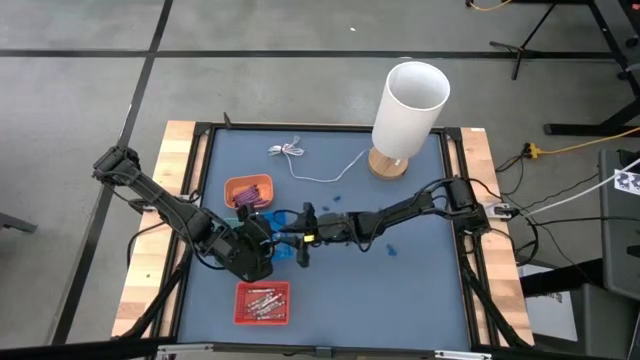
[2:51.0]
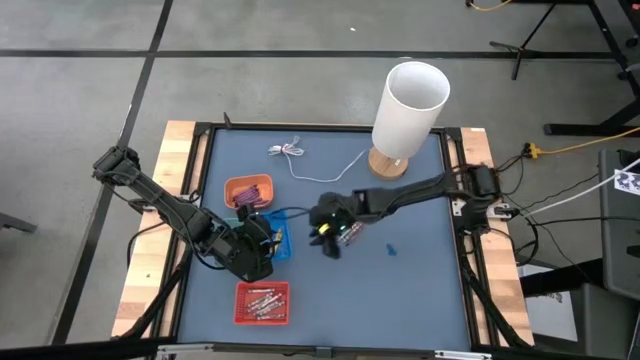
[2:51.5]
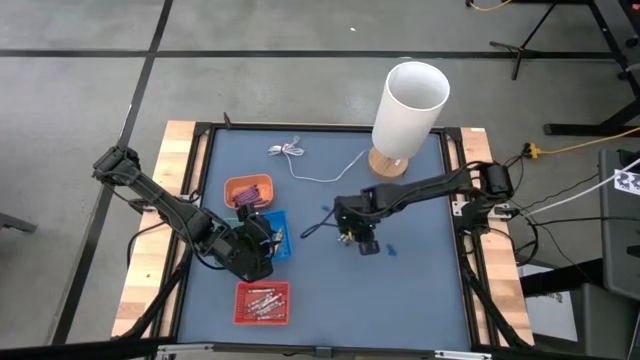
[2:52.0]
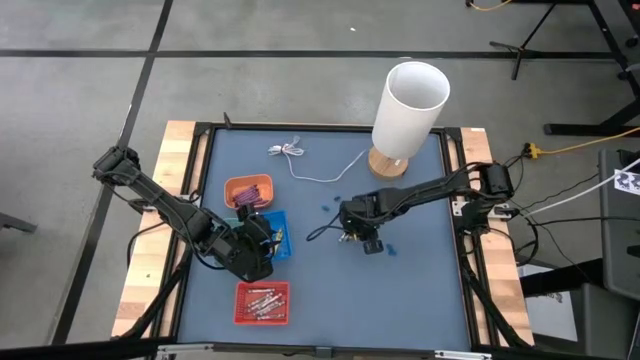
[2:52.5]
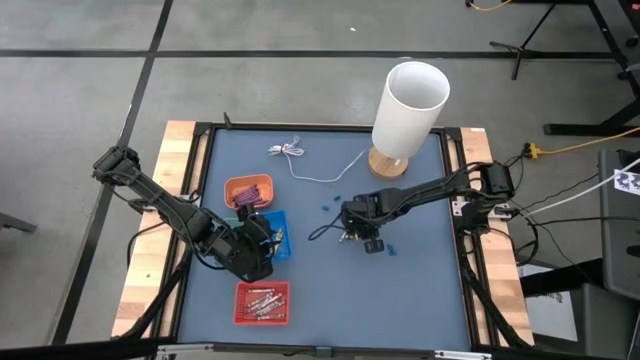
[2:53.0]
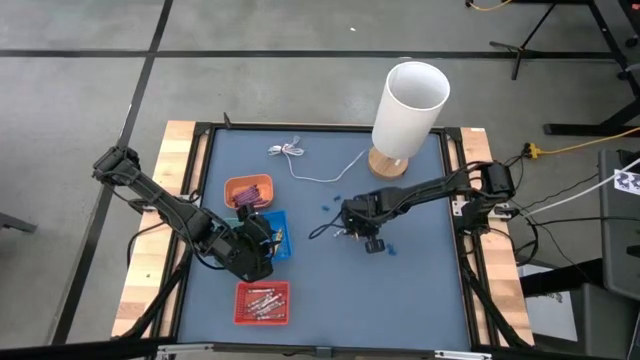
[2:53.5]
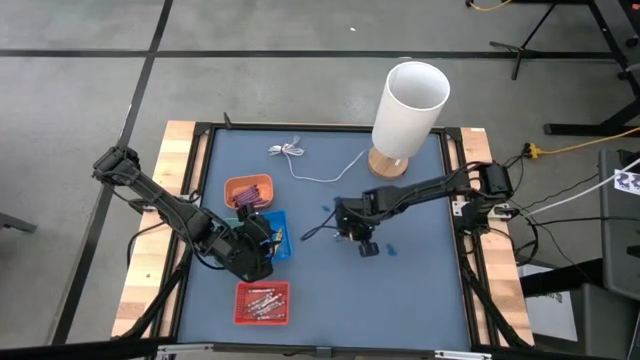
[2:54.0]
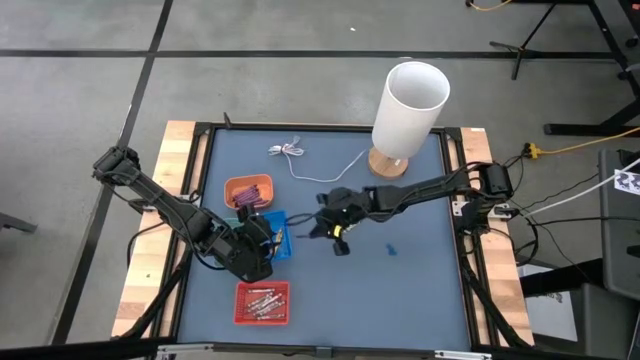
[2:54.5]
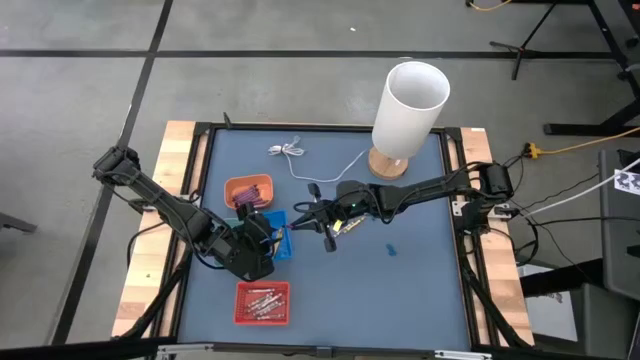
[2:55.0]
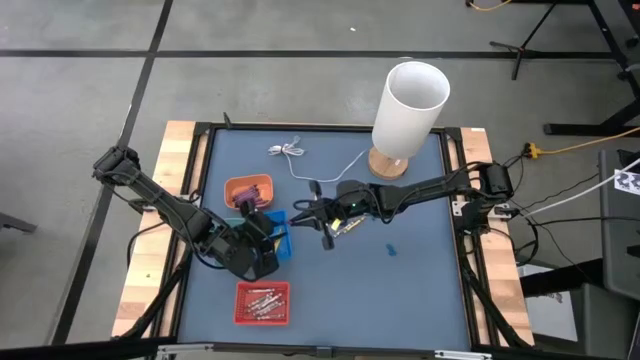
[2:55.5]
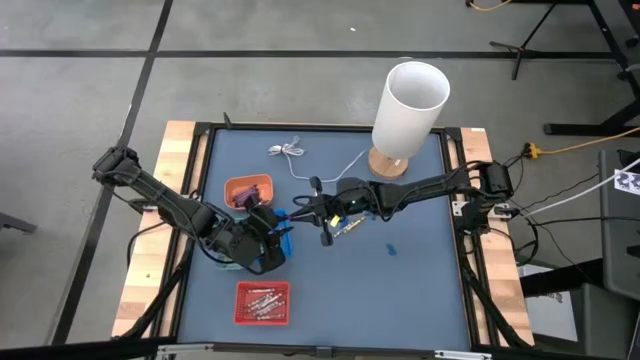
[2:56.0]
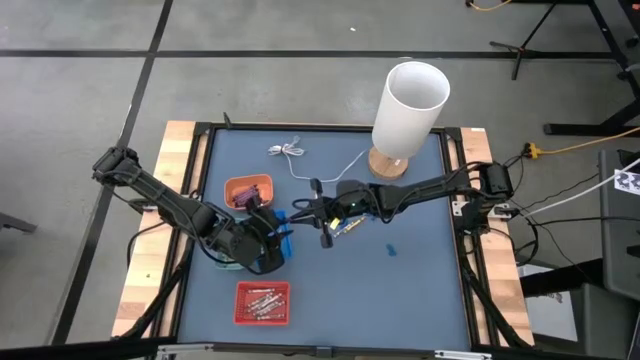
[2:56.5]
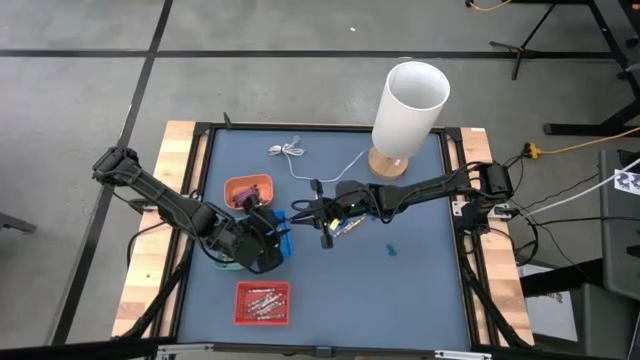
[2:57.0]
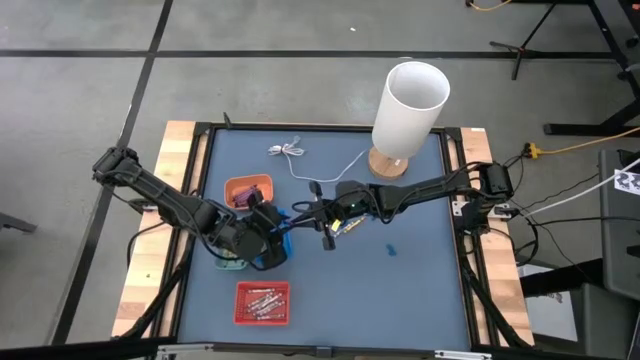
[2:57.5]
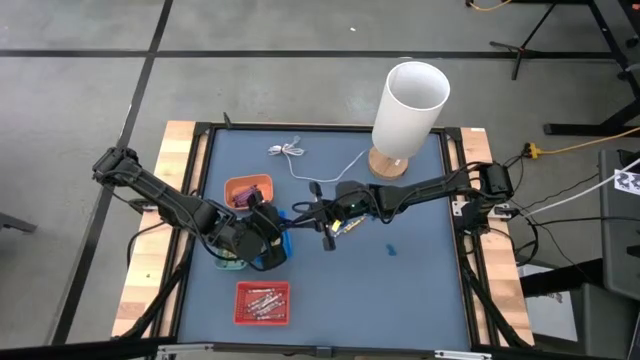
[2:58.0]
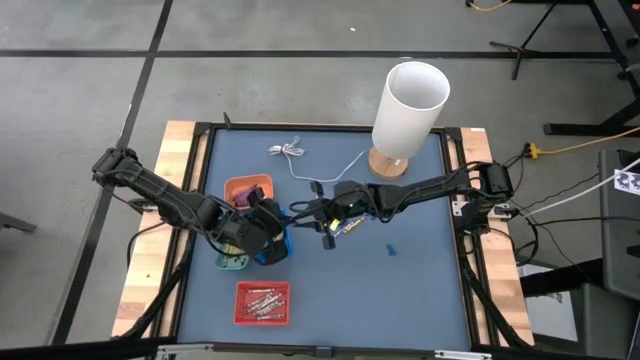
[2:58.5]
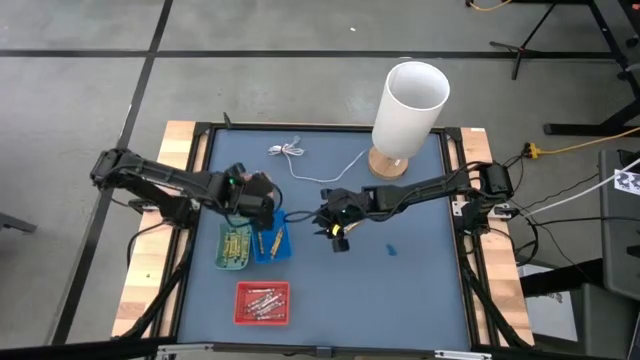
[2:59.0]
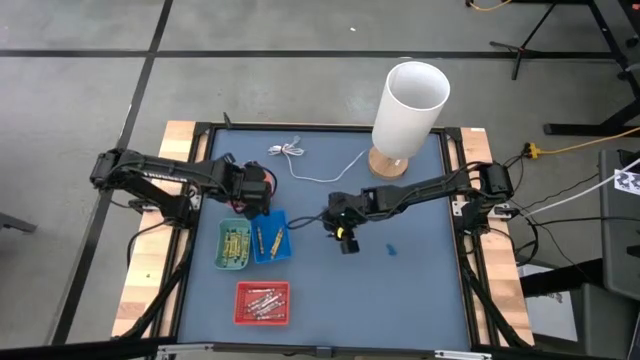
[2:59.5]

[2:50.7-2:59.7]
Task: Sort crayons
Put the violet crayon into the orange bin

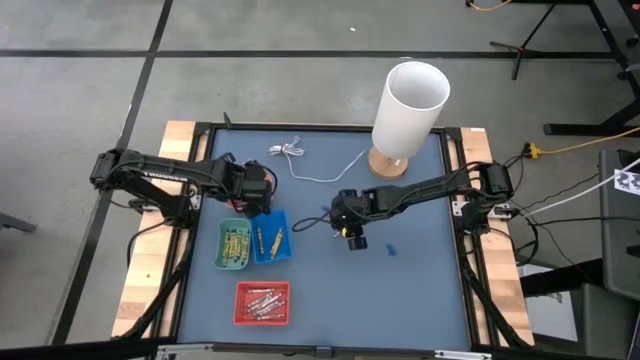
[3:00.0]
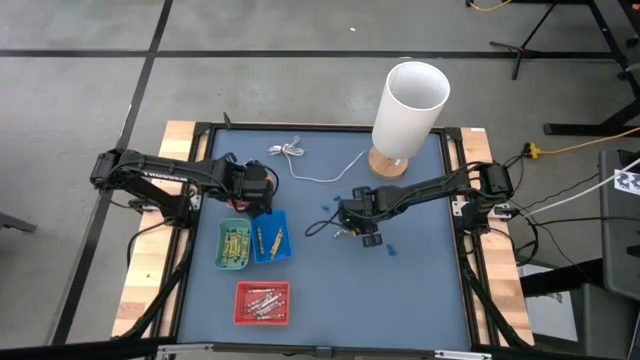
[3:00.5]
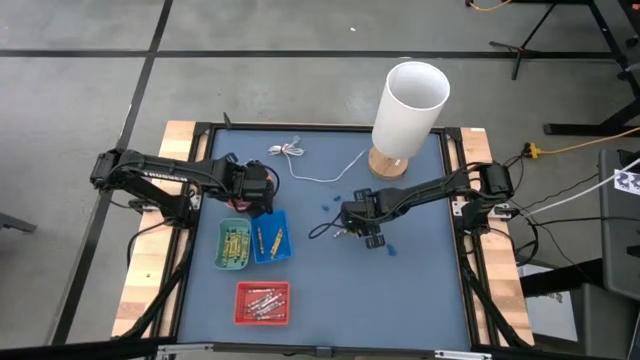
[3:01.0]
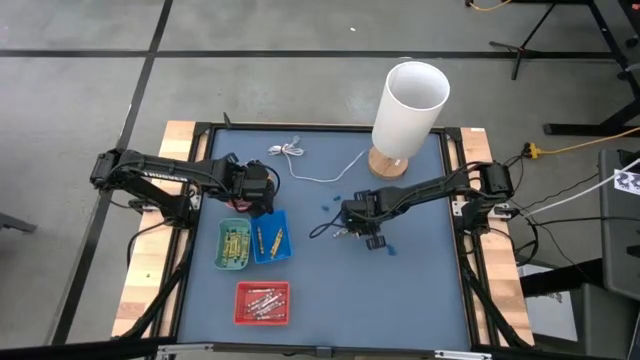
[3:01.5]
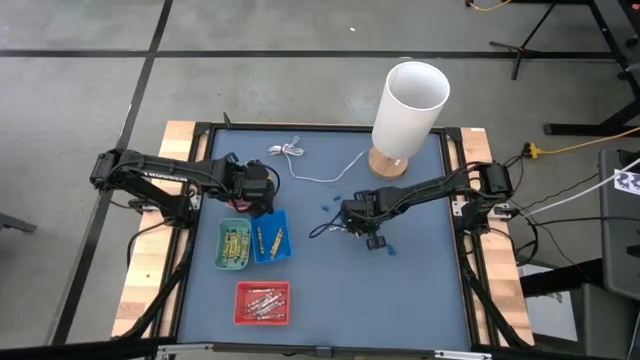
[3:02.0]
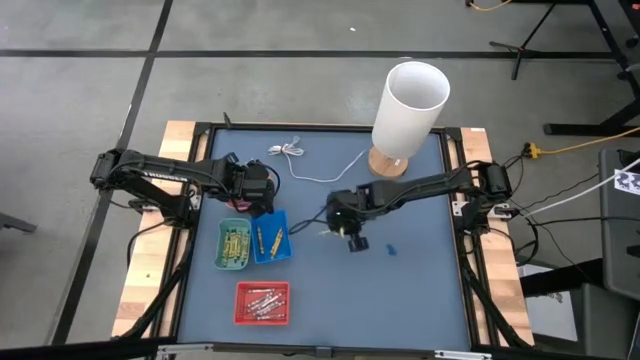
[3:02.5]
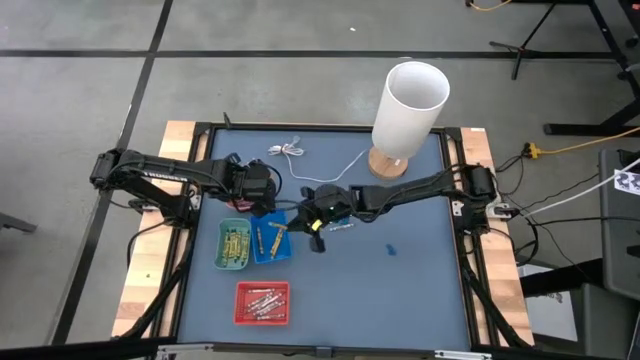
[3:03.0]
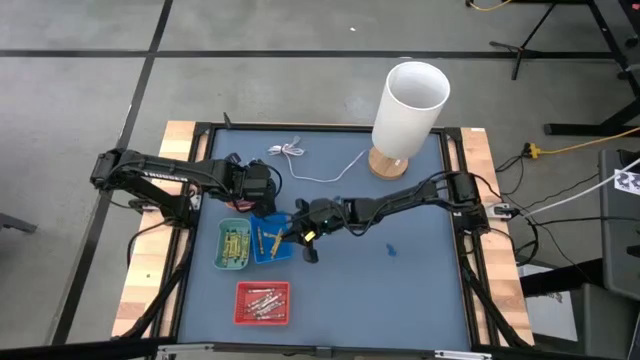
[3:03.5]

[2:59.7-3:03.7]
Put the yellow crayon into the blue bin

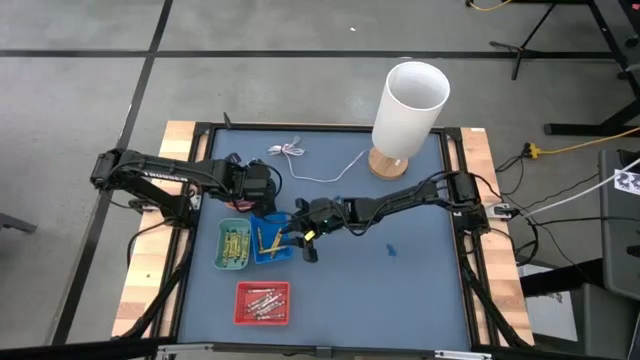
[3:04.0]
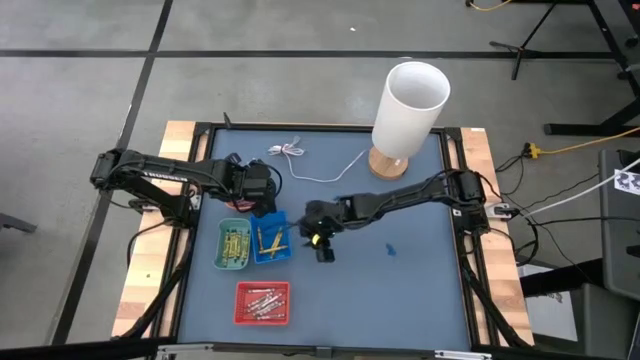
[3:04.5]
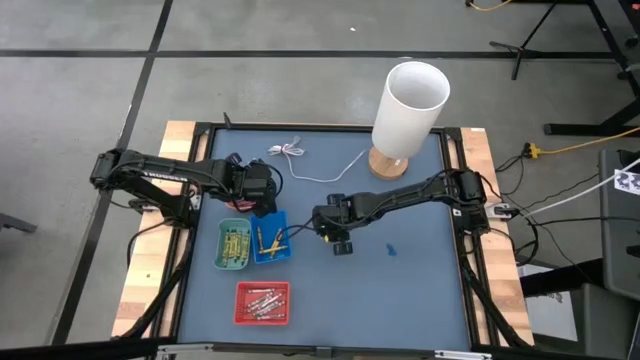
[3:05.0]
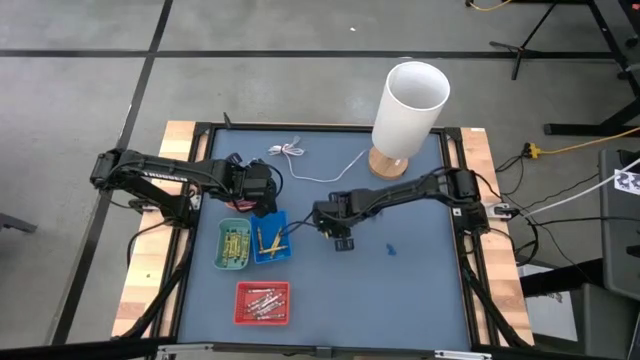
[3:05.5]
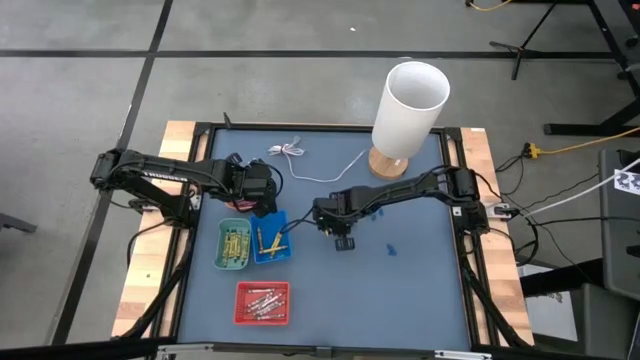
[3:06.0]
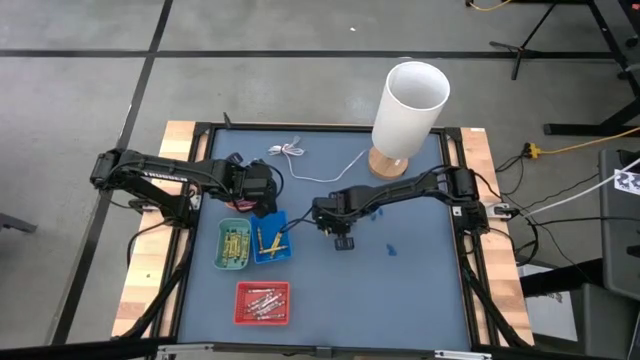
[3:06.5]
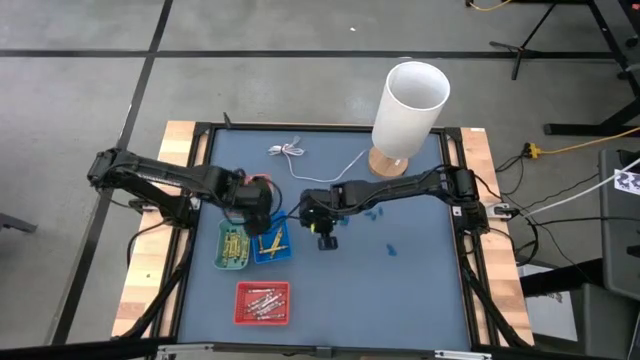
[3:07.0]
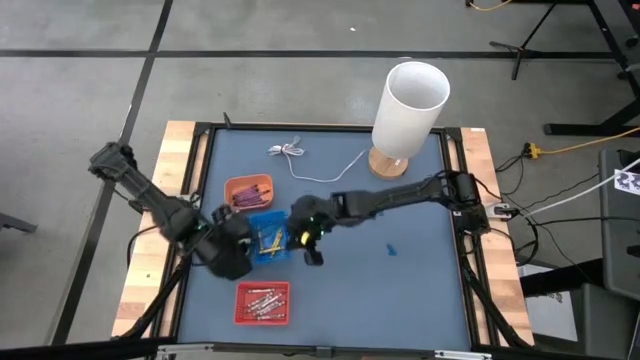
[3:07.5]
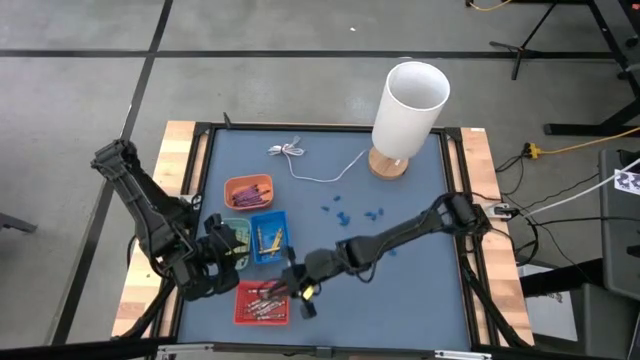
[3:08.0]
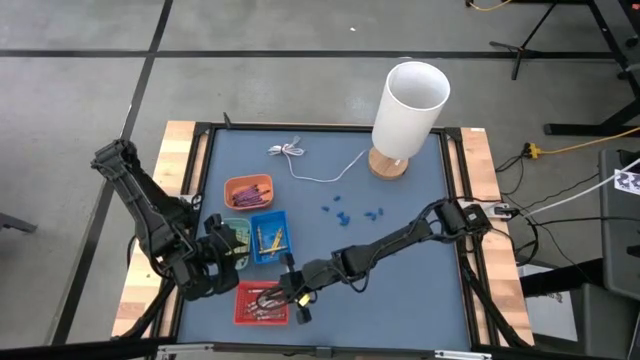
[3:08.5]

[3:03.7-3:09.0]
Put the gray crayon into the orange basket

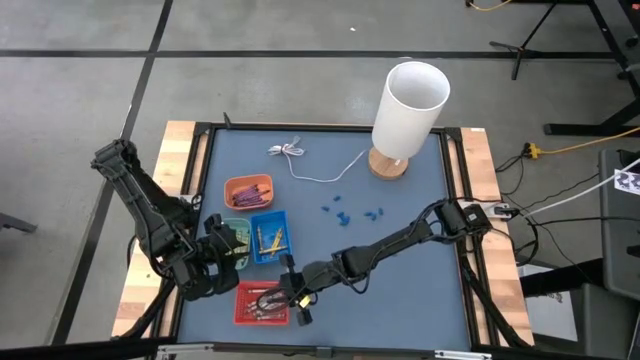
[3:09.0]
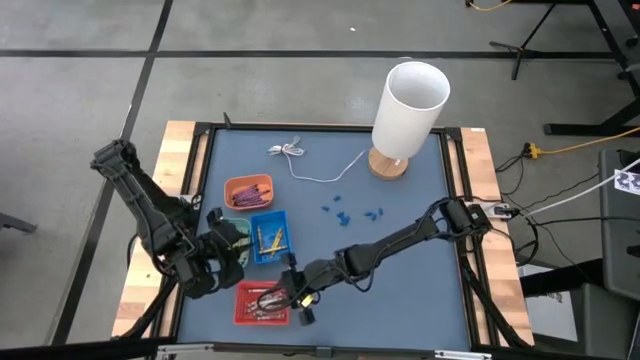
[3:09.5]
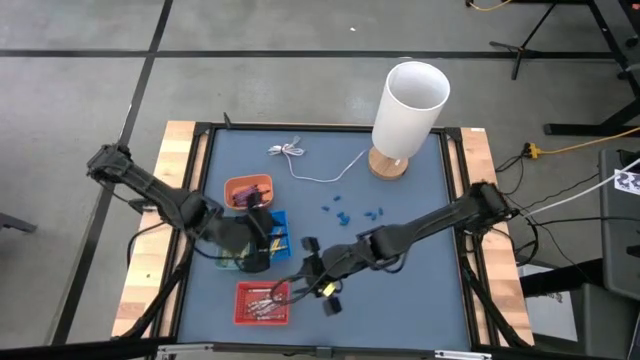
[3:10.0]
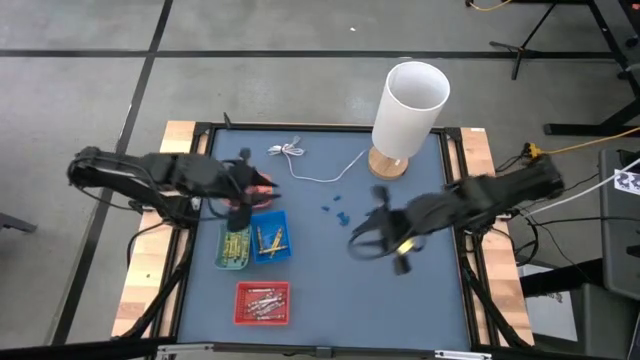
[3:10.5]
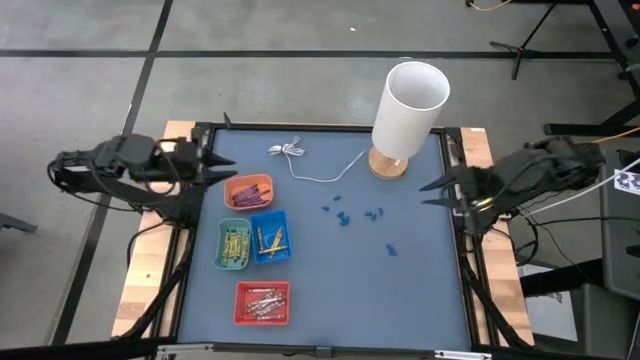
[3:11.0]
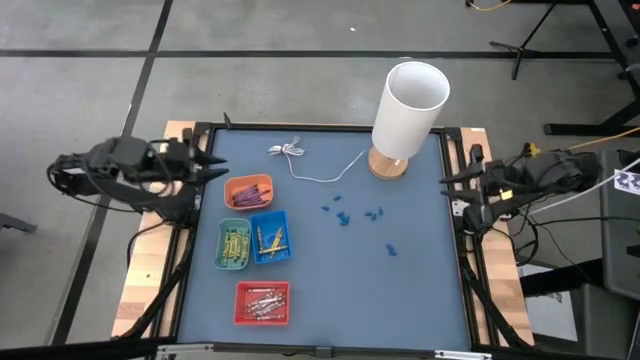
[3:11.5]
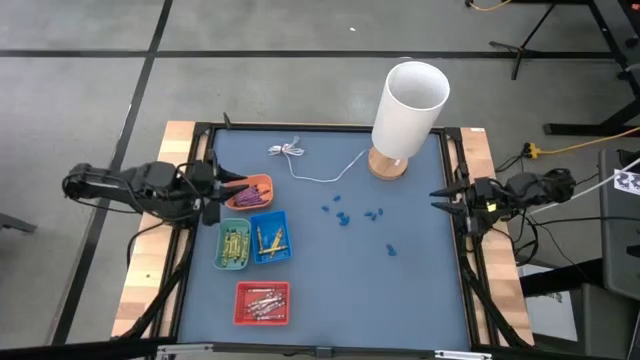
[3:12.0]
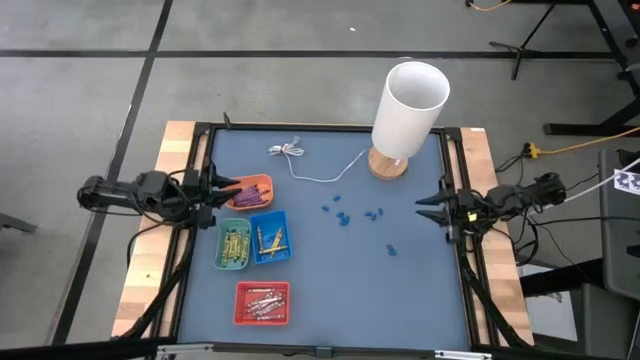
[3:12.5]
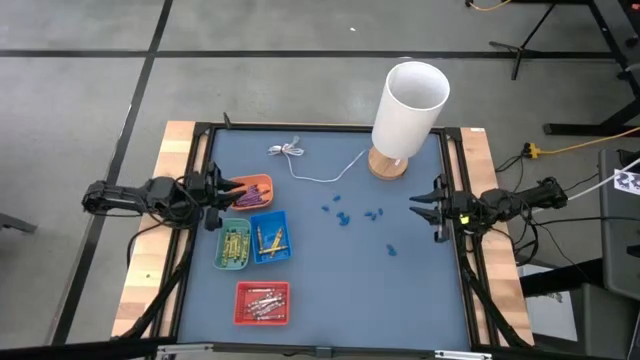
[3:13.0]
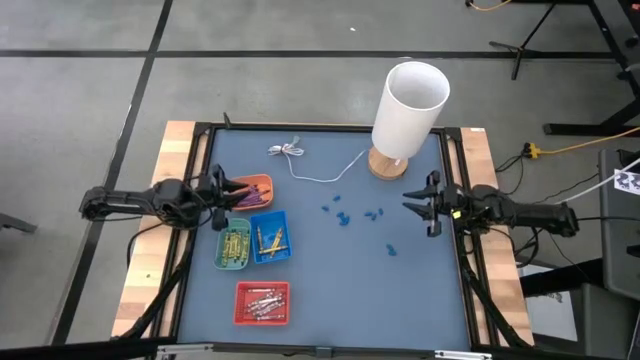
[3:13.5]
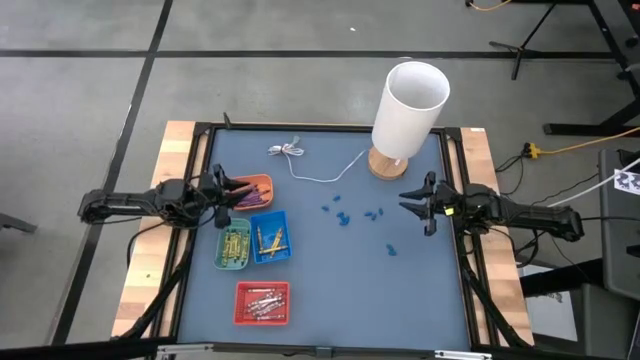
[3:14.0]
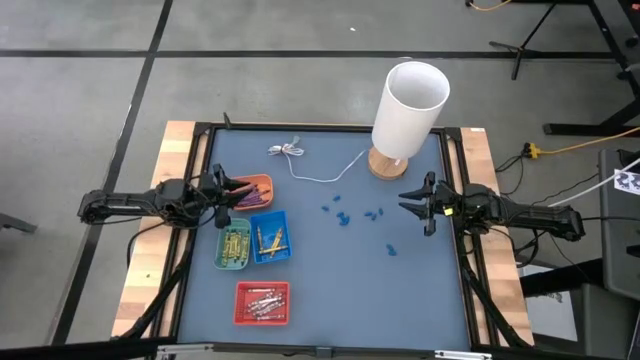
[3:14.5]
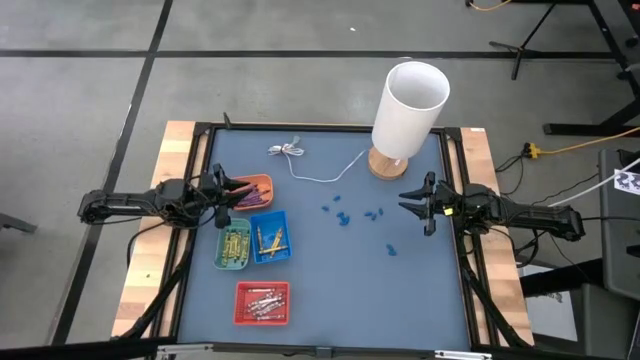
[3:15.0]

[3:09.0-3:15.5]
Return to Home Position
